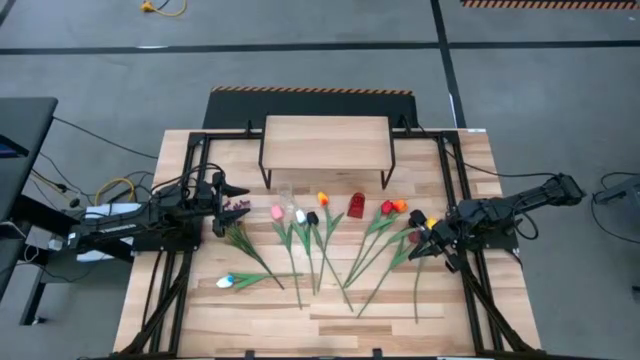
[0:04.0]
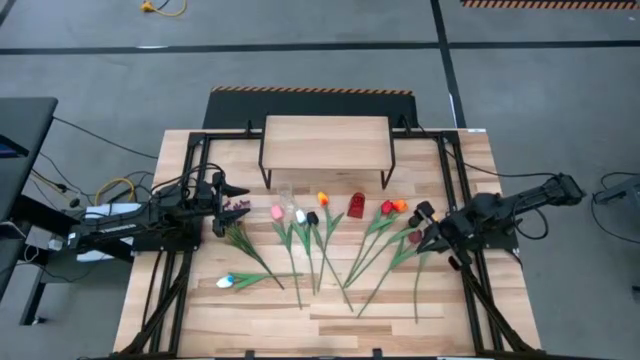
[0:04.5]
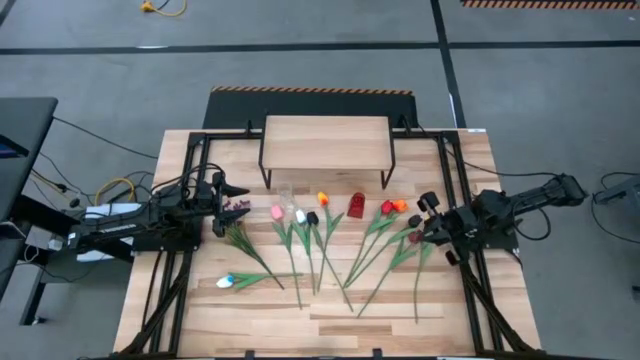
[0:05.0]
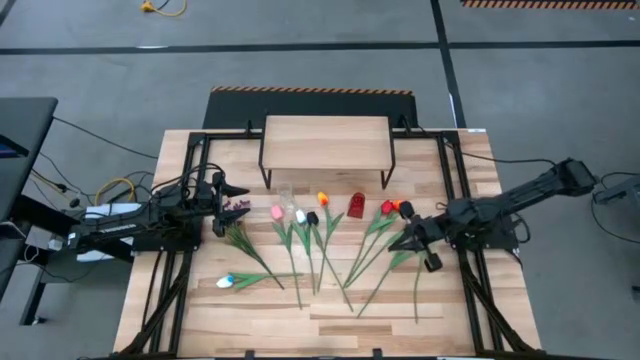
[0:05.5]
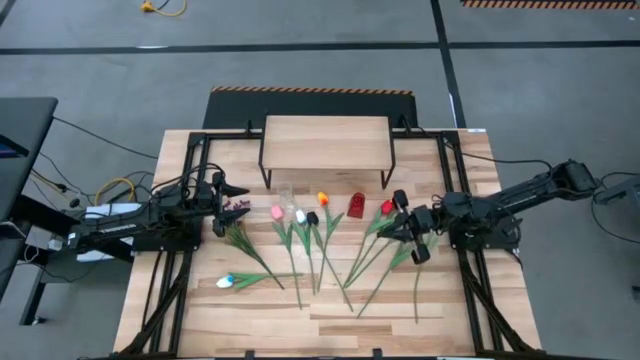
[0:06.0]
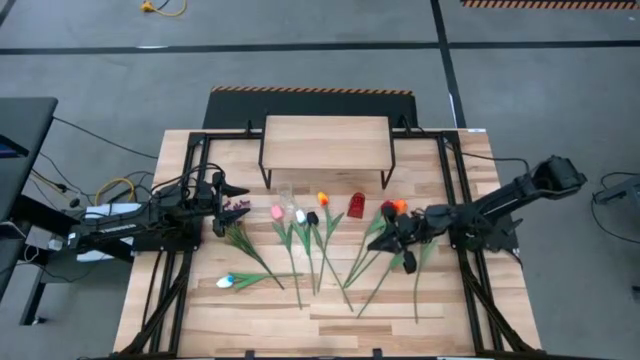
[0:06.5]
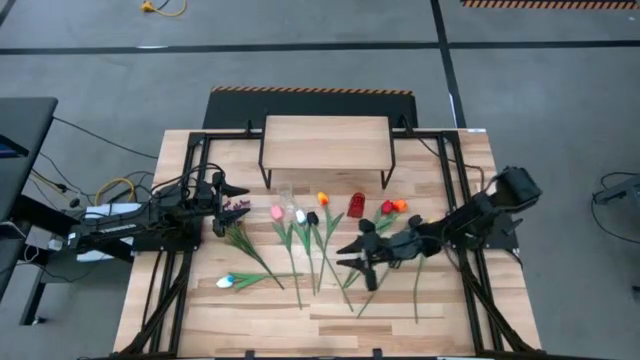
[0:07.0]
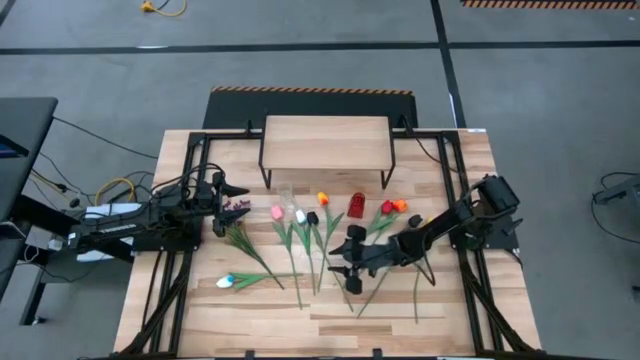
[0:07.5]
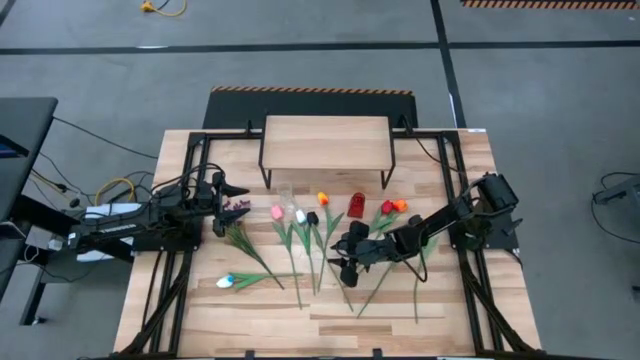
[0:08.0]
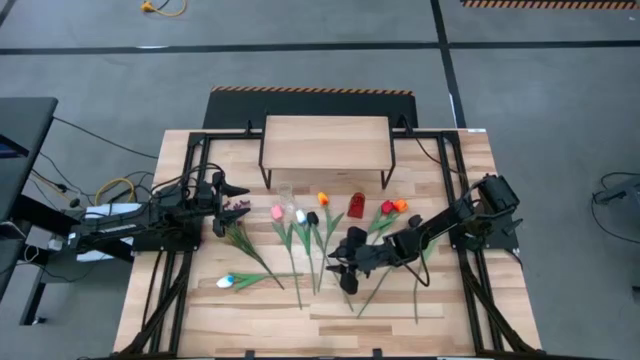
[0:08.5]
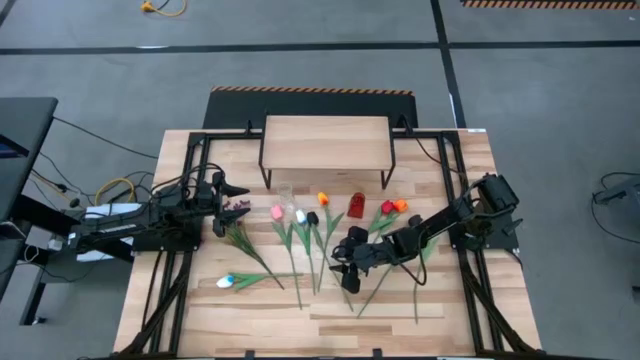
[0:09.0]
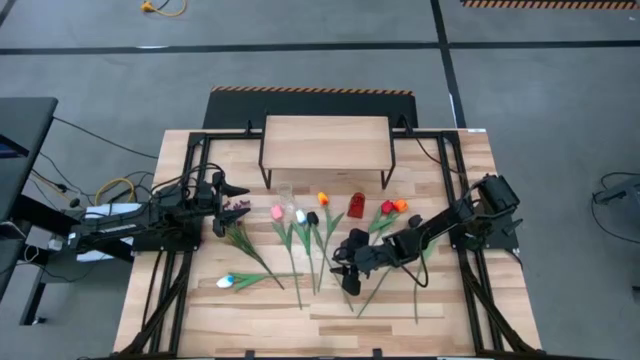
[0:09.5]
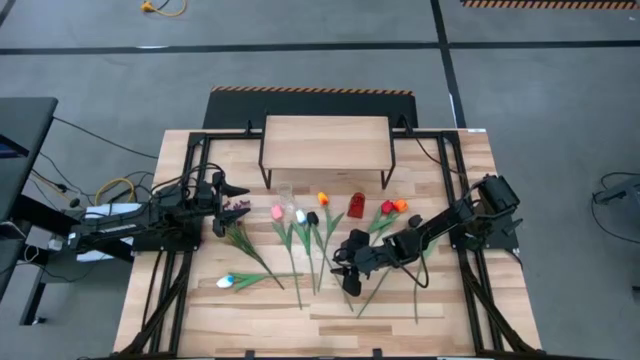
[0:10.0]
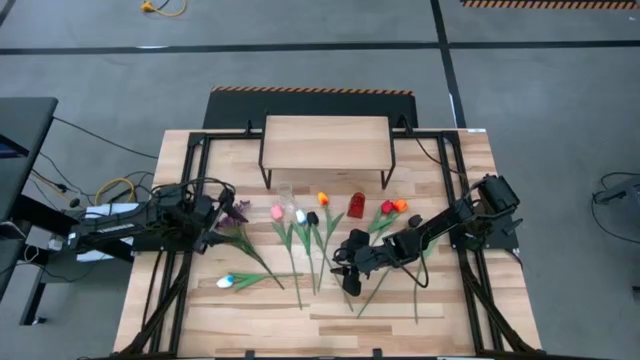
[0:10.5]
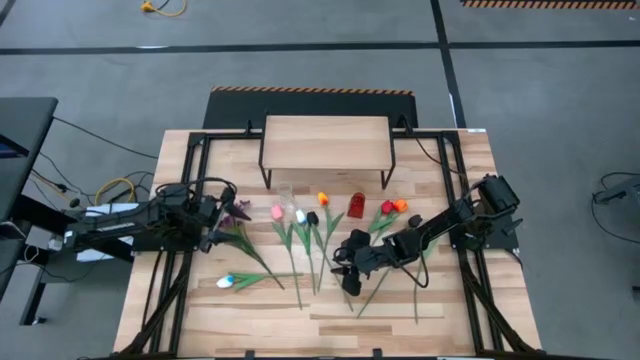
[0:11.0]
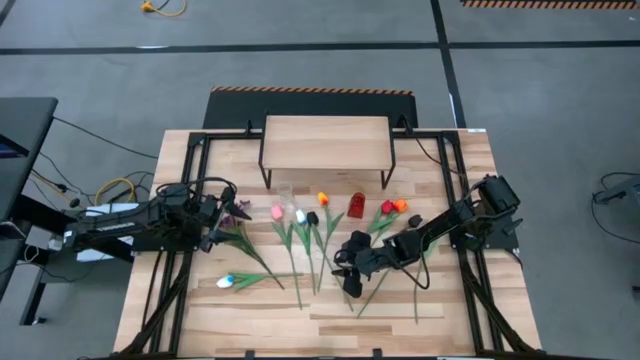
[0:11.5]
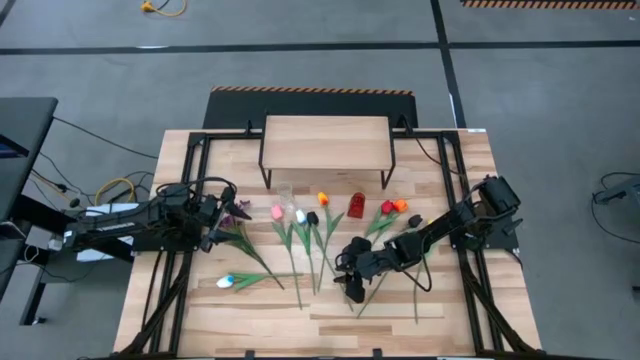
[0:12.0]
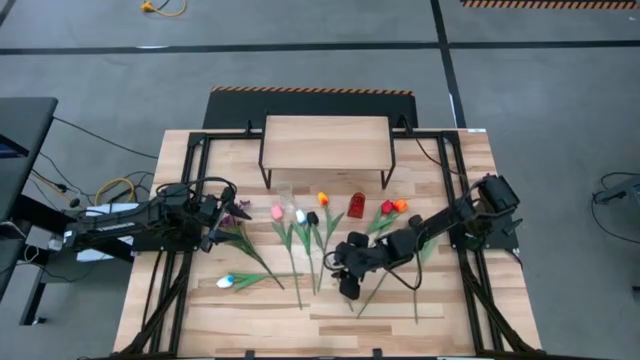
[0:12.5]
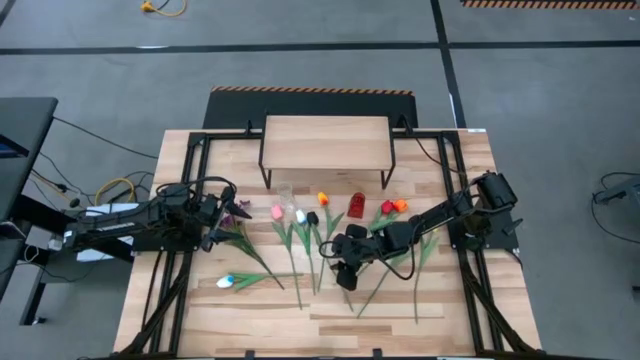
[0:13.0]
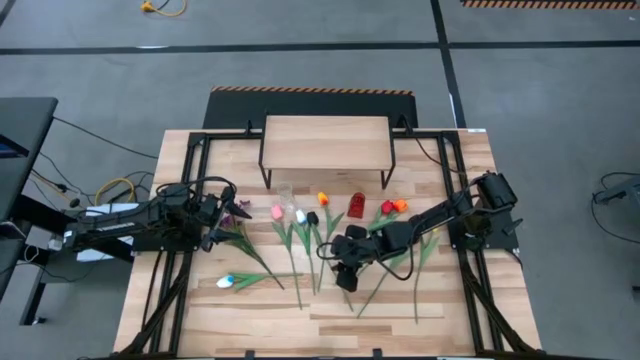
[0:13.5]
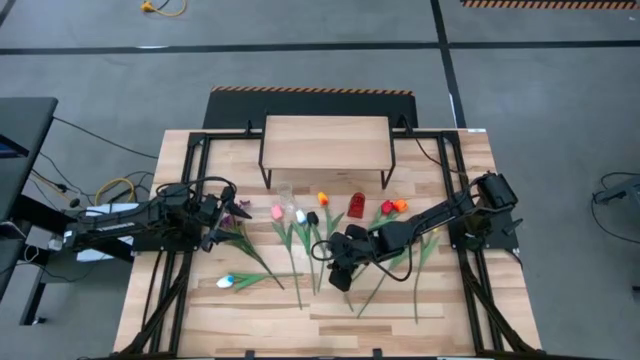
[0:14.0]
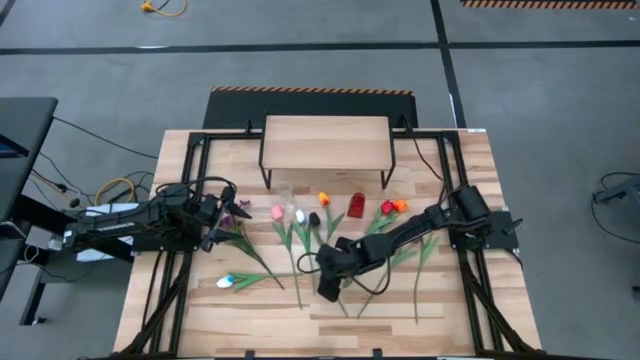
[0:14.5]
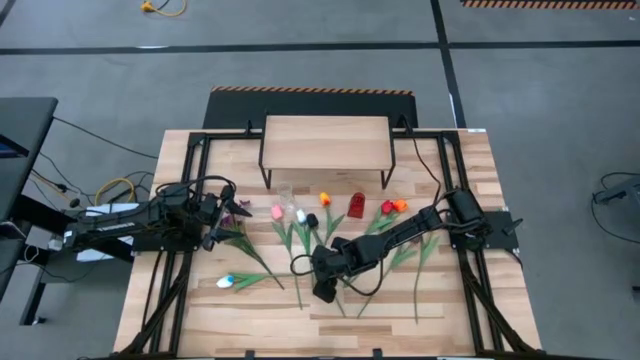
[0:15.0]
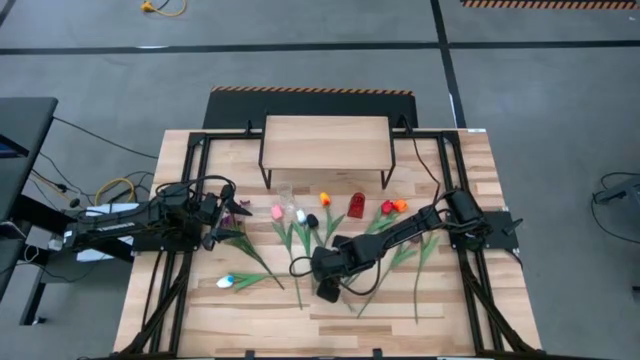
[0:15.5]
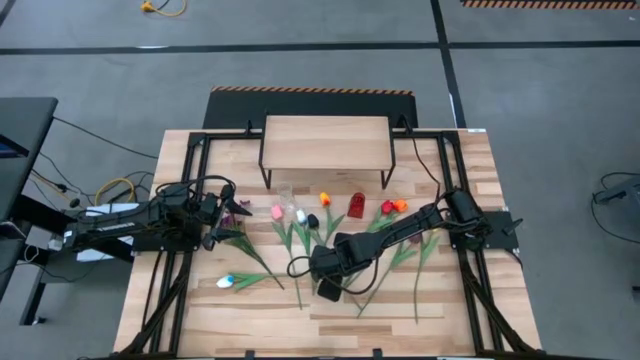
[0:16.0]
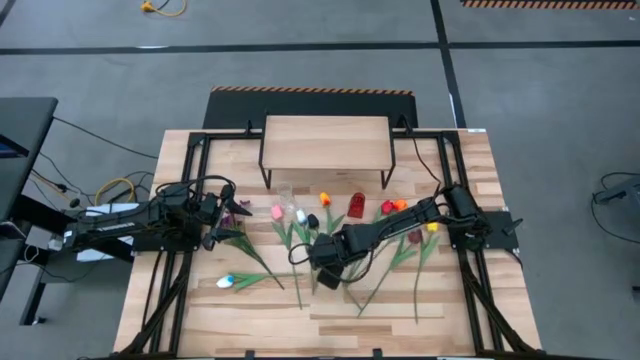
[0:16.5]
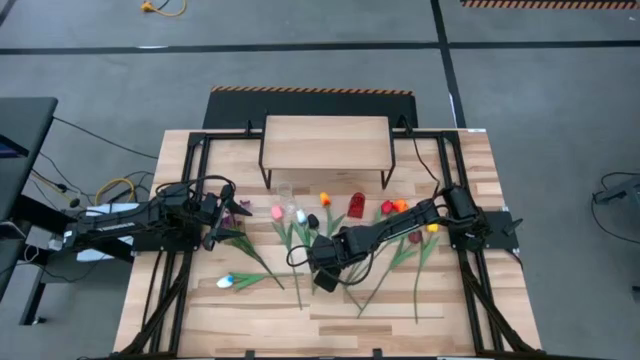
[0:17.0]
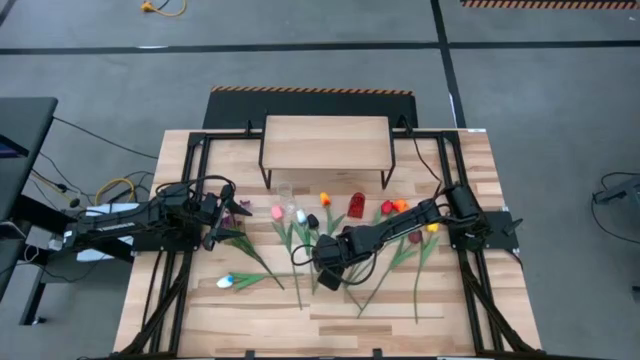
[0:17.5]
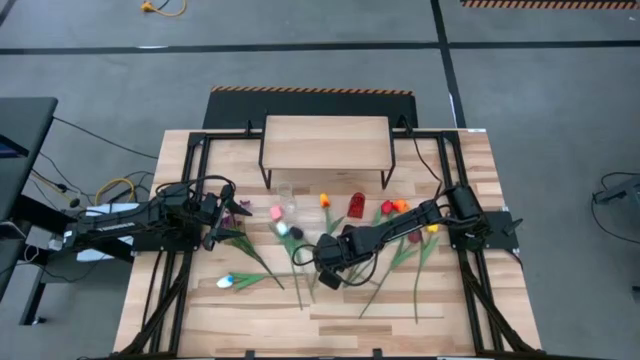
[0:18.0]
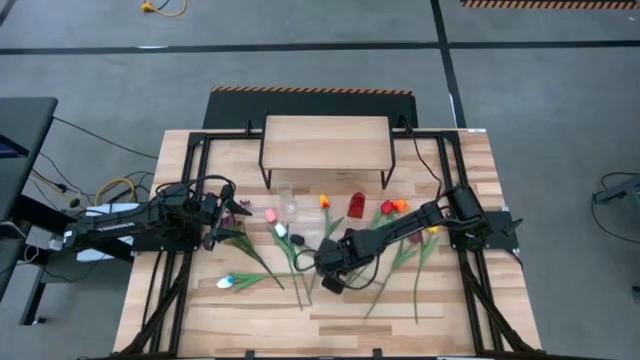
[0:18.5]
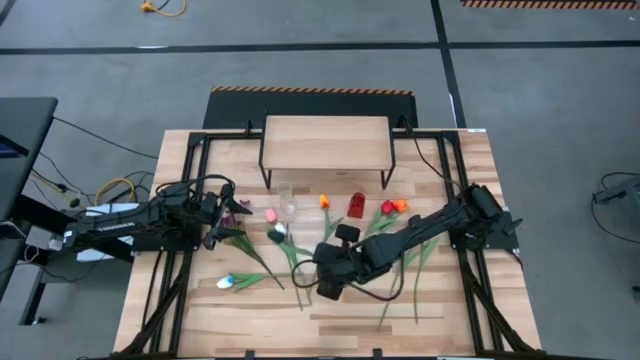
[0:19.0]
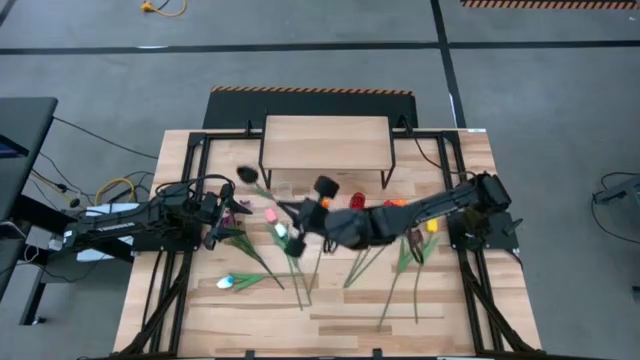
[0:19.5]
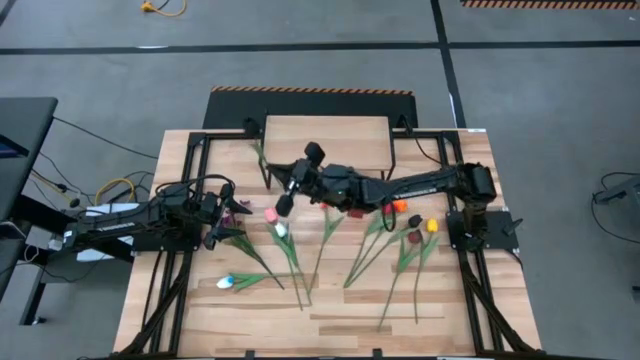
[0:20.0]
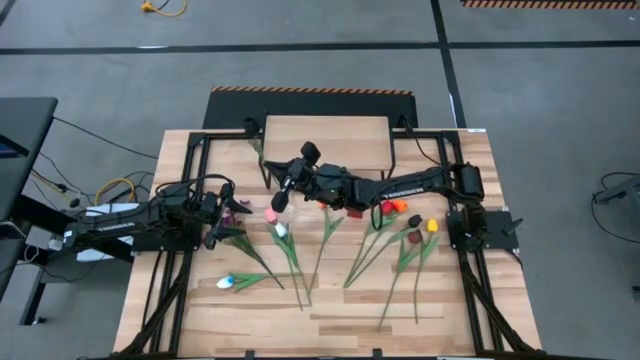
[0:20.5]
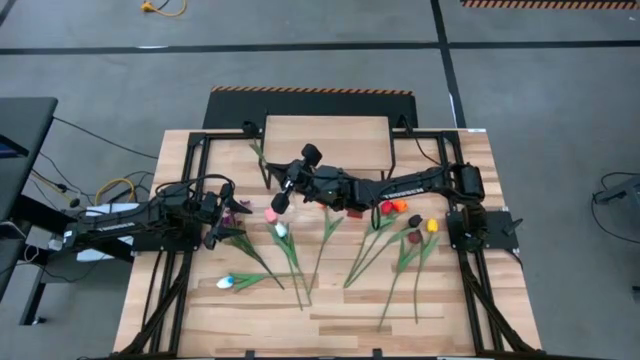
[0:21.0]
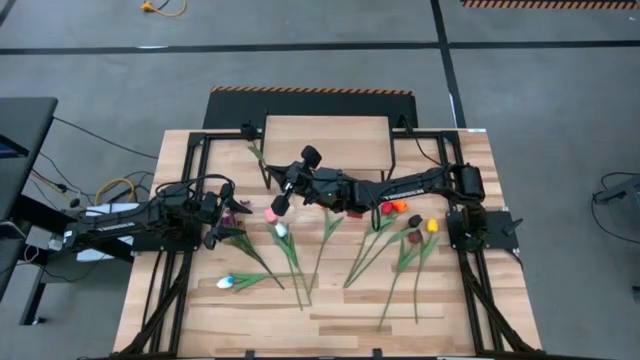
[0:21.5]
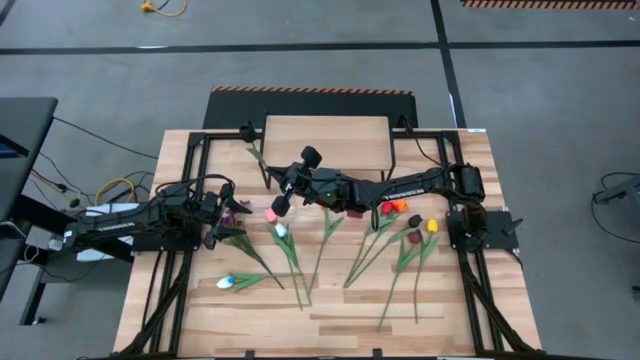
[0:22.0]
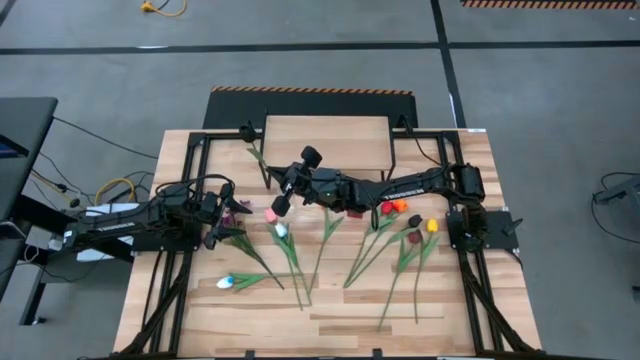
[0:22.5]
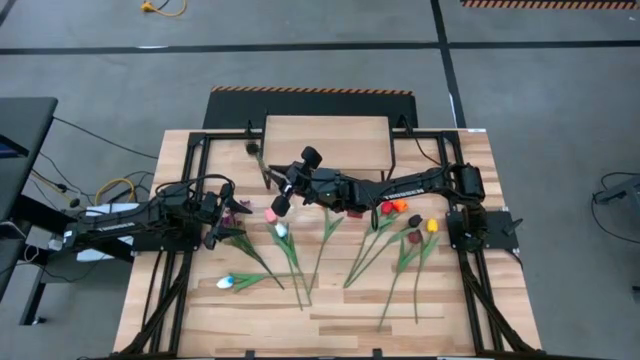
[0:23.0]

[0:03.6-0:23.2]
Task: Pick and place flowers into a vace then onto a shelf
Put the left black flower into the transparent vase

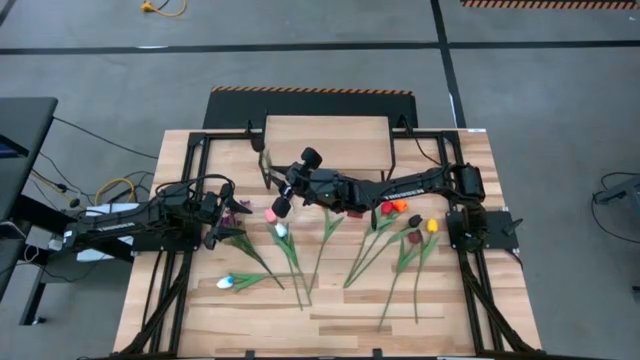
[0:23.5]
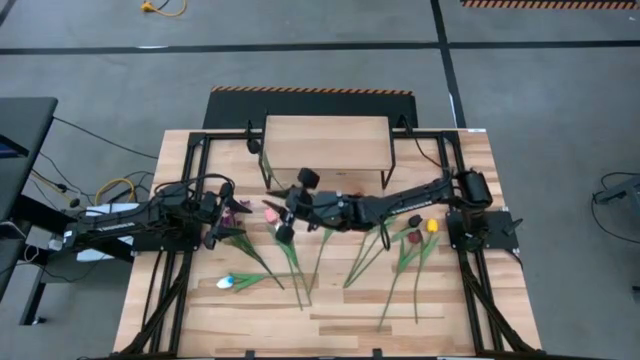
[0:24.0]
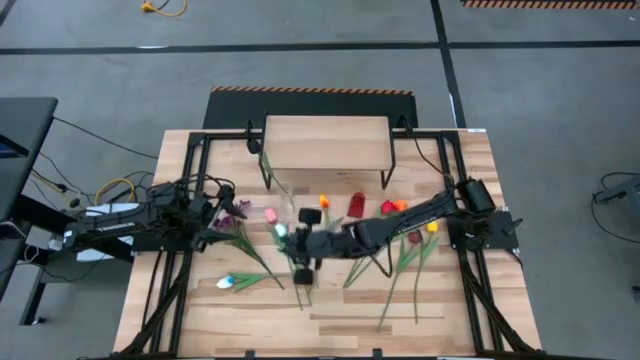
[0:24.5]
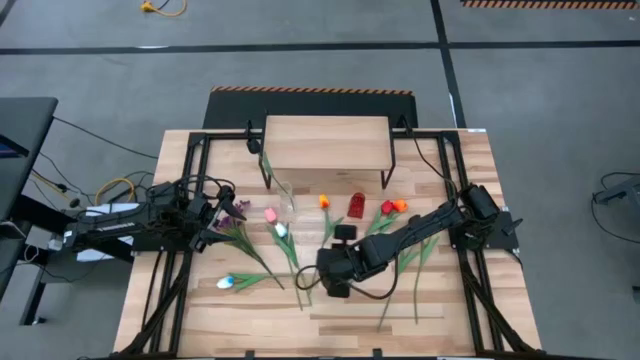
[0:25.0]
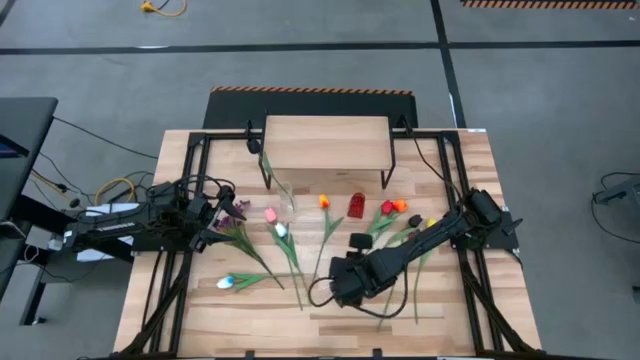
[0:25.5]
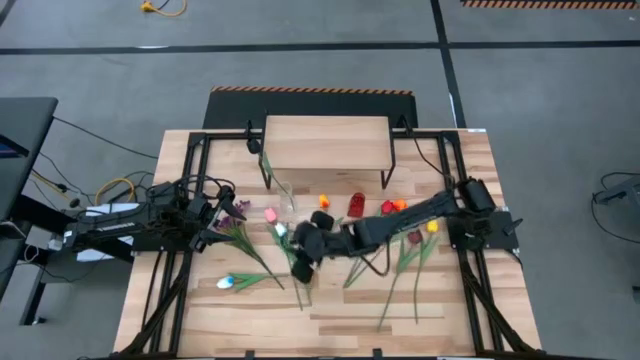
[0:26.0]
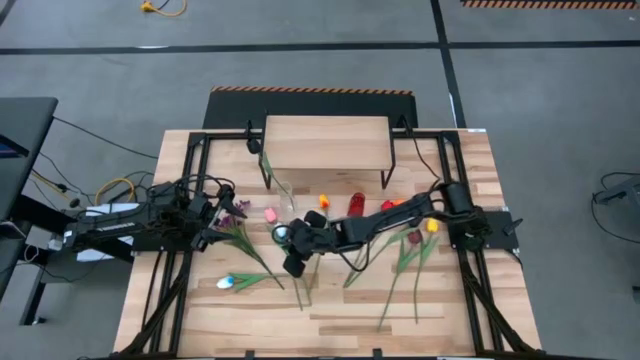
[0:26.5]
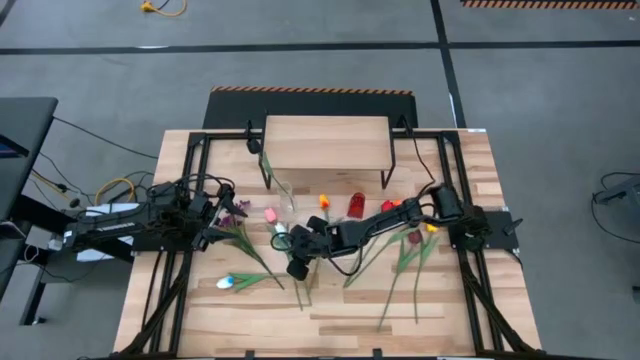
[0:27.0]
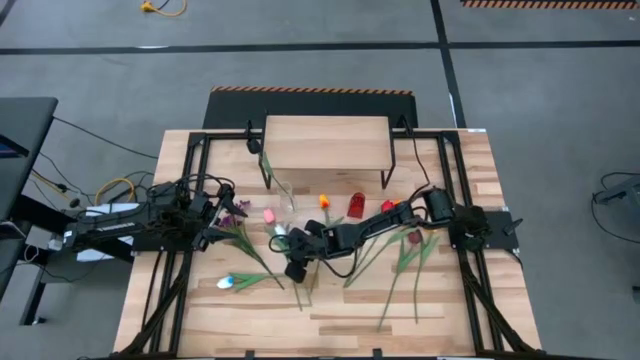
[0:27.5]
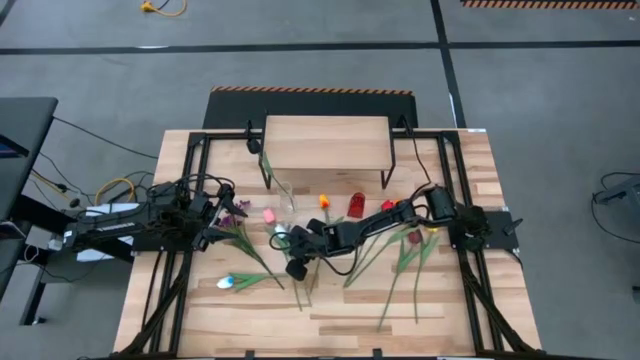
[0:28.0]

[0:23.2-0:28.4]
Put the top white flower into the red vase
